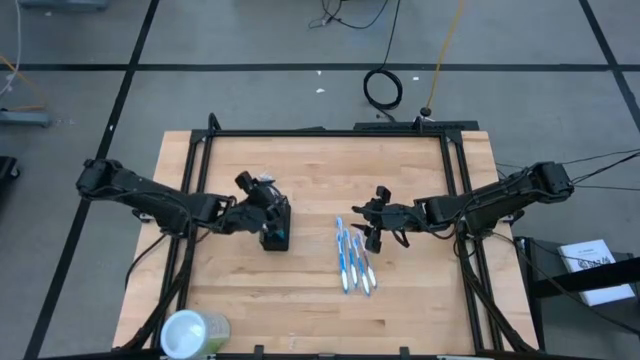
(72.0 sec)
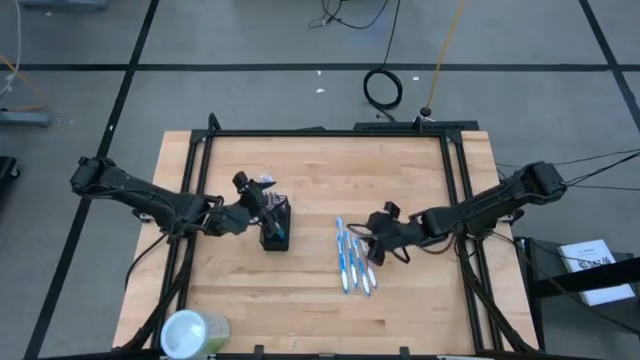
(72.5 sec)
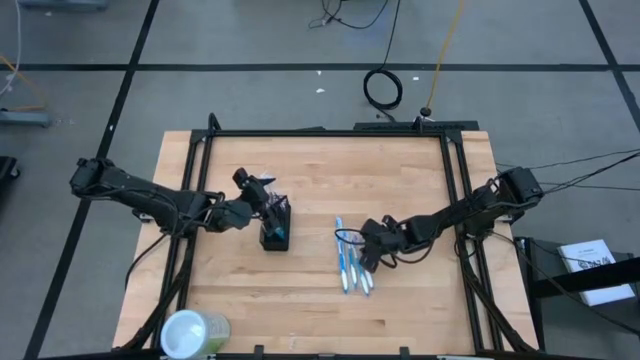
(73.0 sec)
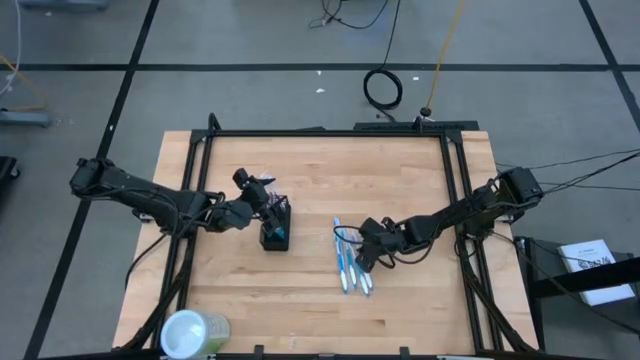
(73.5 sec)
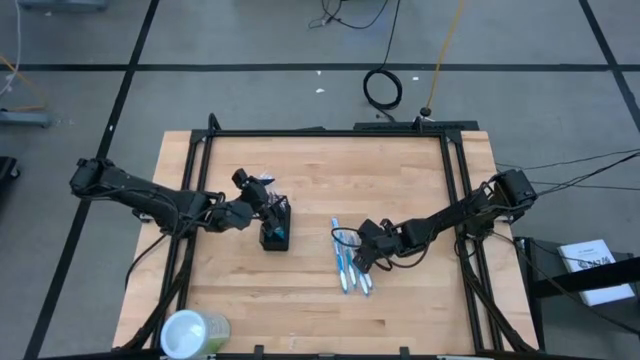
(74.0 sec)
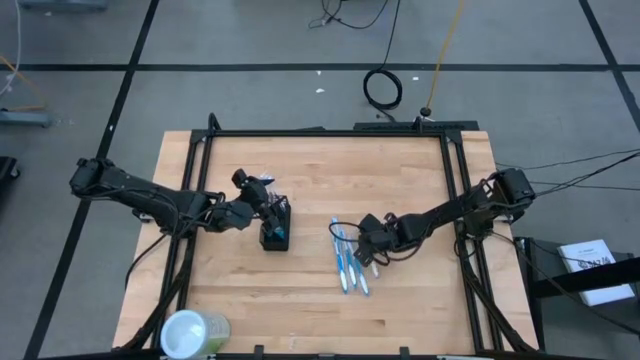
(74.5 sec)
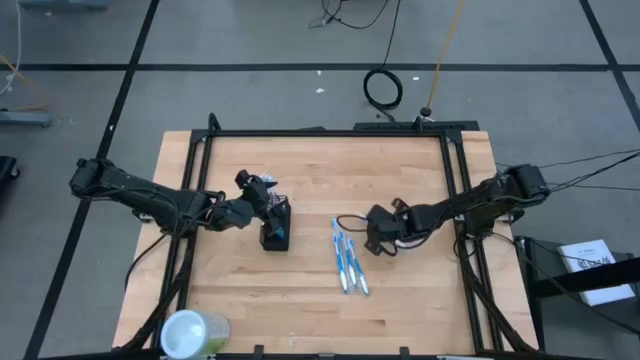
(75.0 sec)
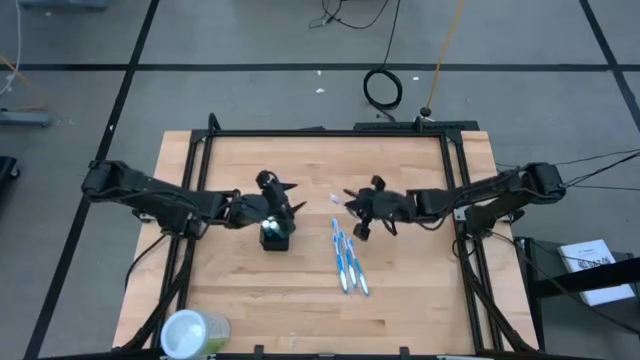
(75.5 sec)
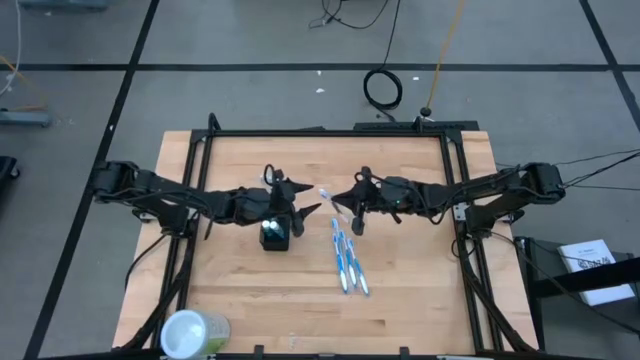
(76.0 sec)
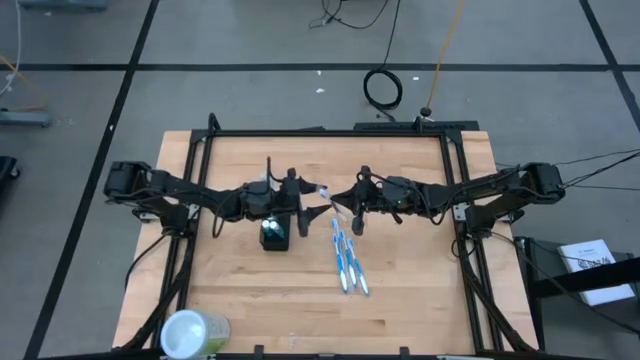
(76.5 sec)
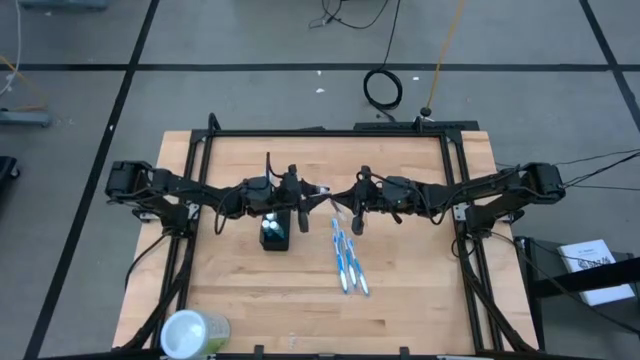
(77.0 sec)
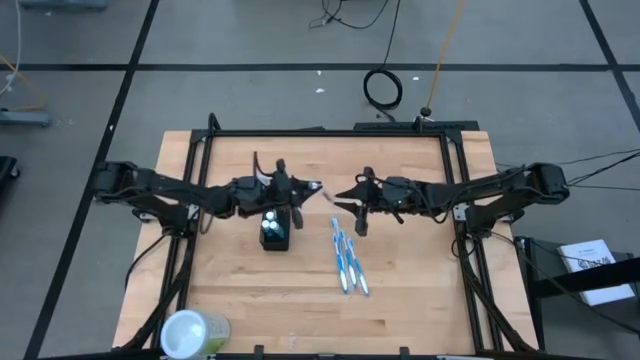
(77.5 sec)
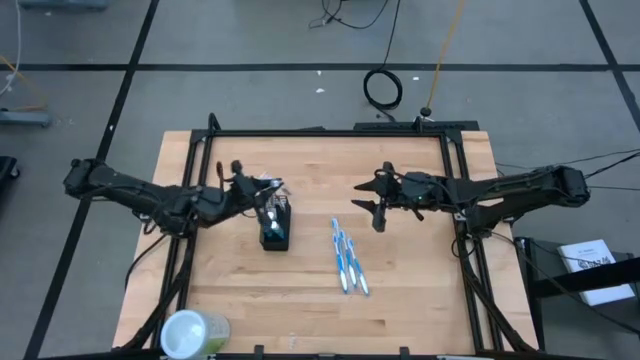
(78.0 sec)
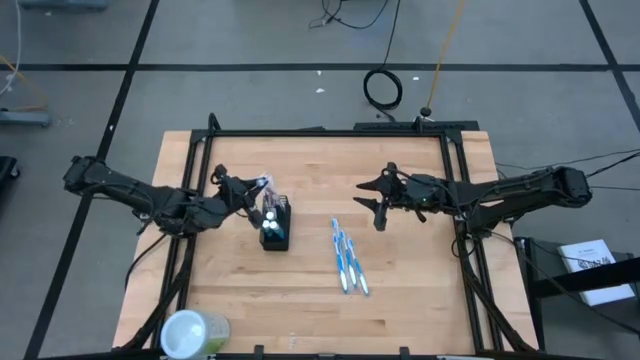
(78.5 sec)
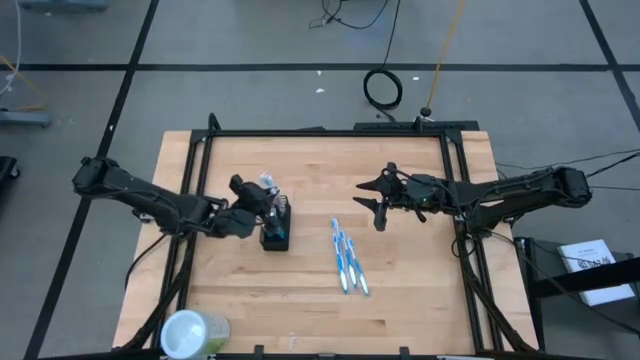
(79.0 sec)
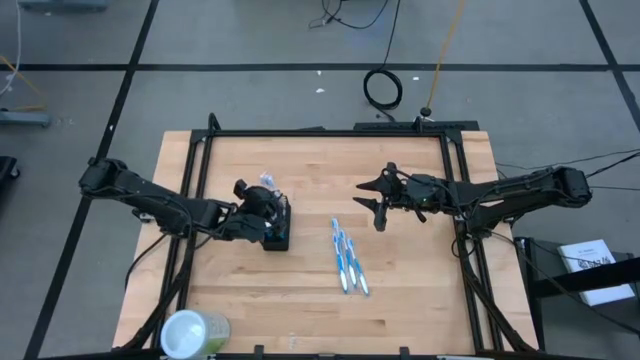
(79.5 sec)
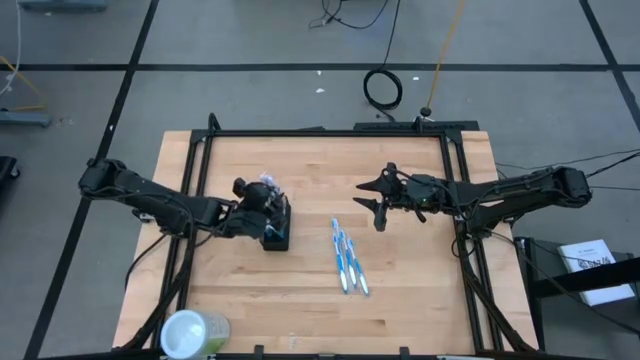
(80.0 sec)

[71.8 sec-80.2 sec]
Task: Pick & Place toothbrushing station
Put the purple toothbrush into the top compartment of the mesh organizer

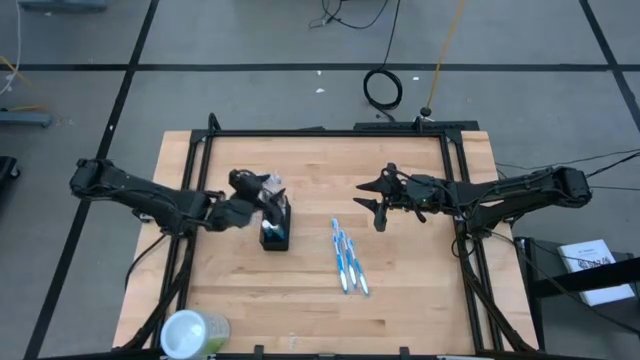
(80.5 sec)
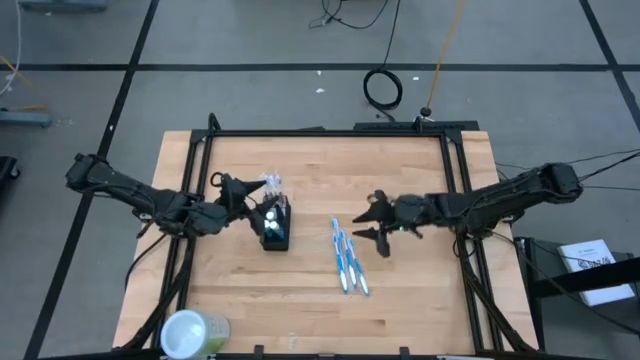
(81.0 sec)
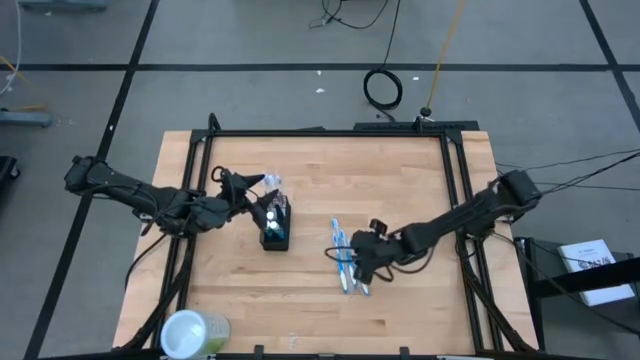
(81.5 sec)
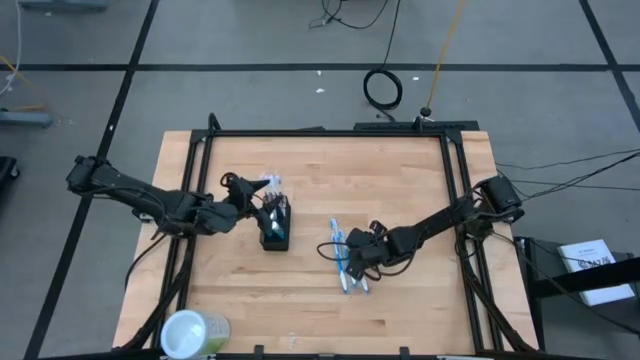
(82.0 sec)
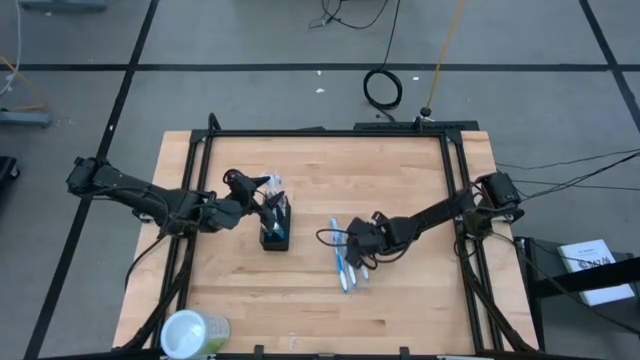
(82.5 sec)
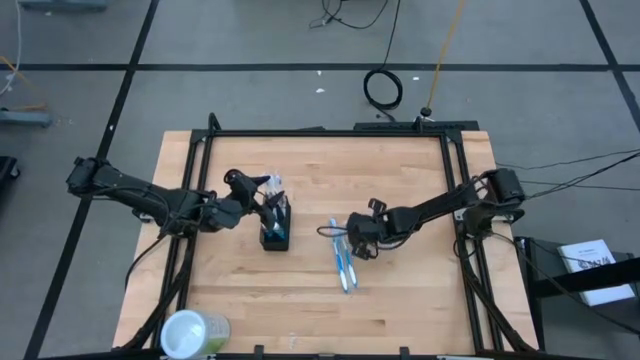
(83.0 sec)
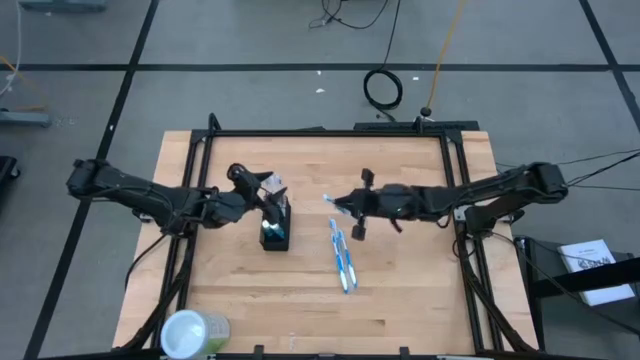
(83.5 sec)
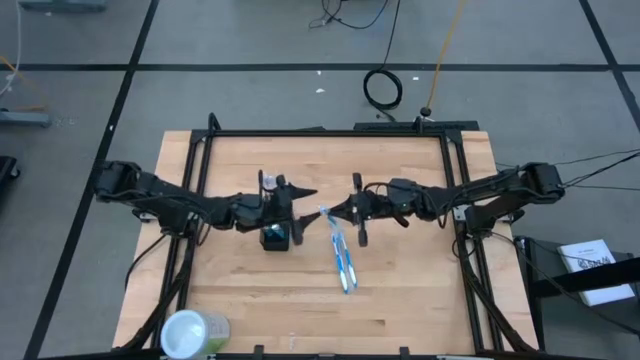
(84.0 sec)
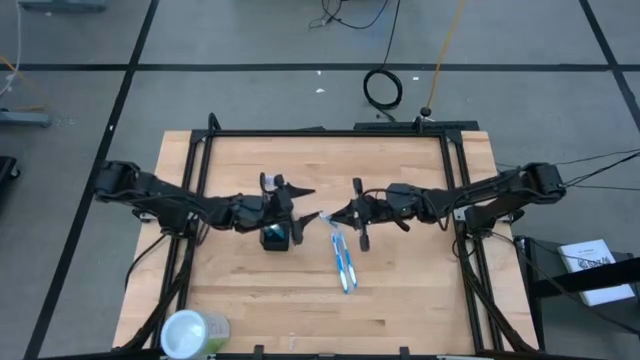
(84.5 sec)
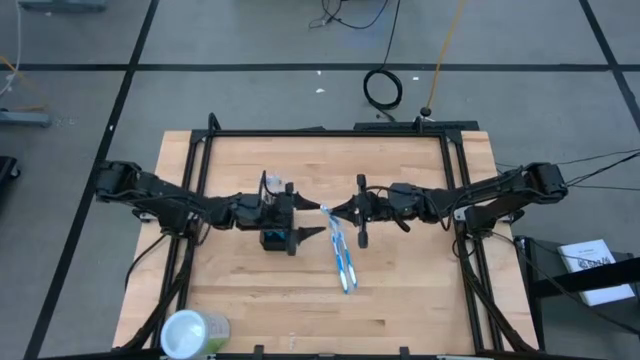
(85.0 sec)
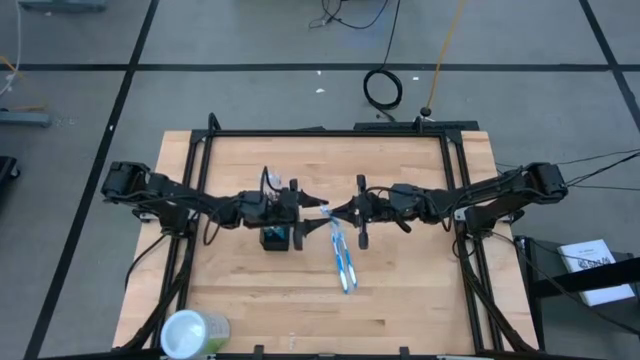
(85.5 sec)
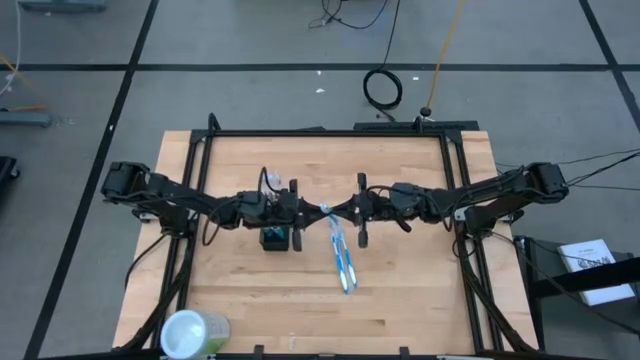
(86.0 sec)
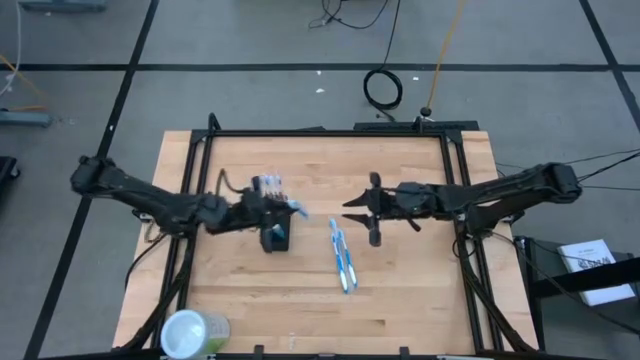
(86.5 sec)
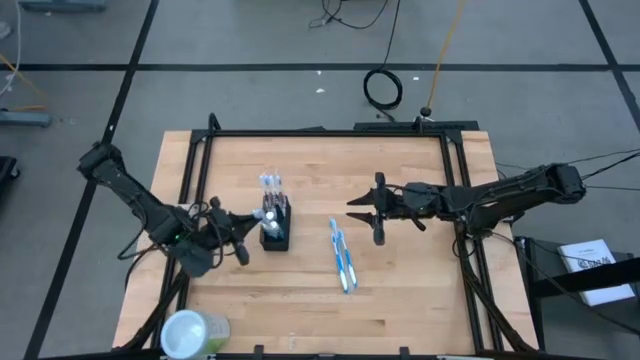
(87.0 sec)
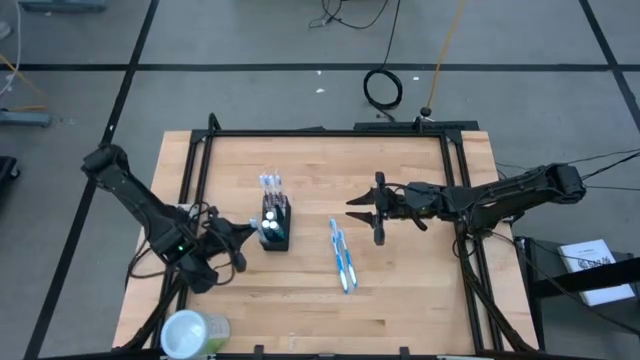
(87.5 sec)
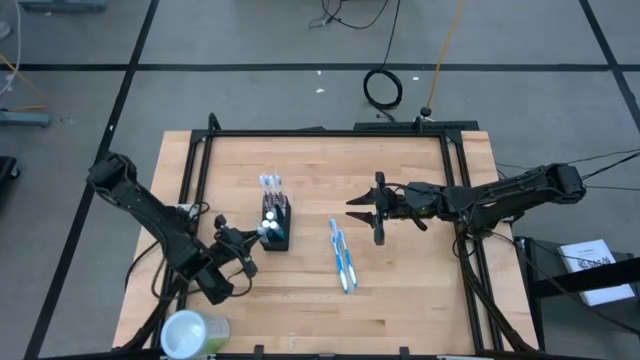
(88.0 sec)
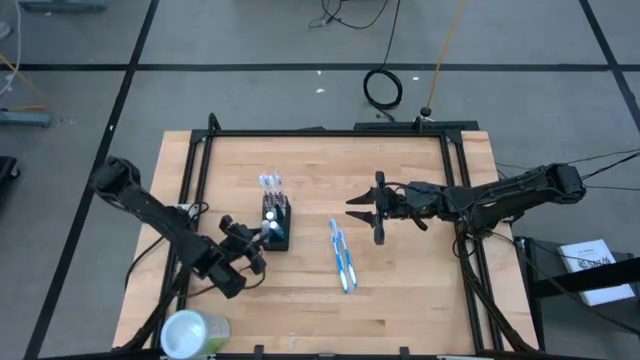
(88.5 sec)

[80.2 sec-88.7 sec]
Put the blue toothbrush into the bottom compartment of the mesh organizer

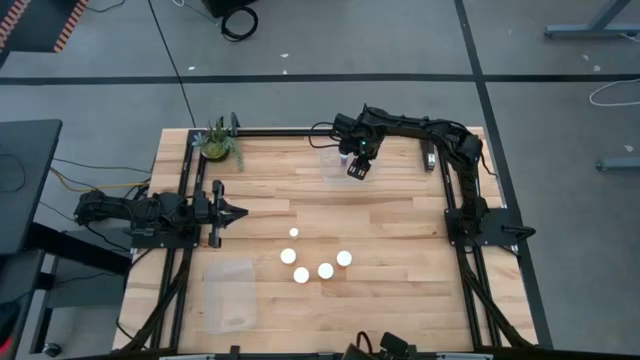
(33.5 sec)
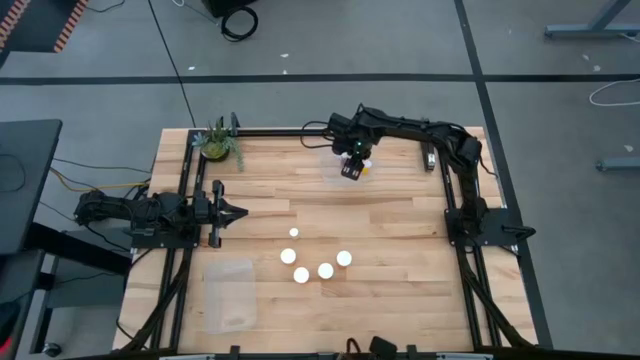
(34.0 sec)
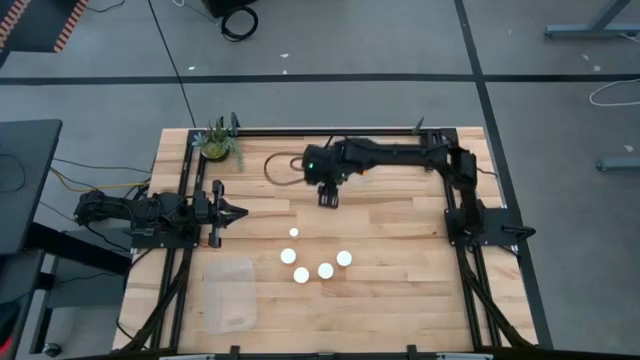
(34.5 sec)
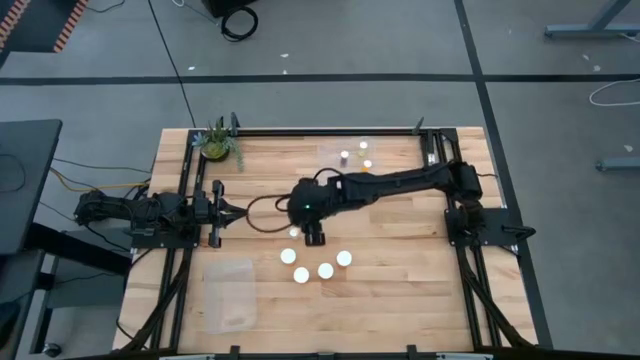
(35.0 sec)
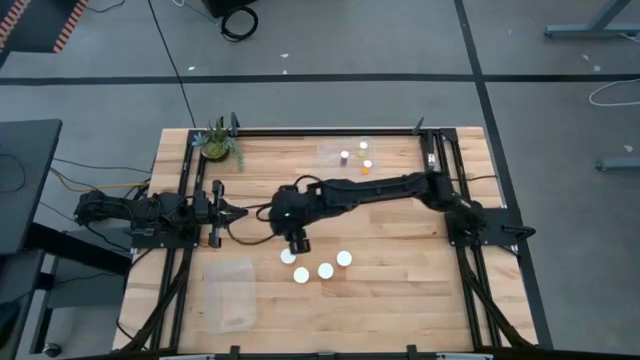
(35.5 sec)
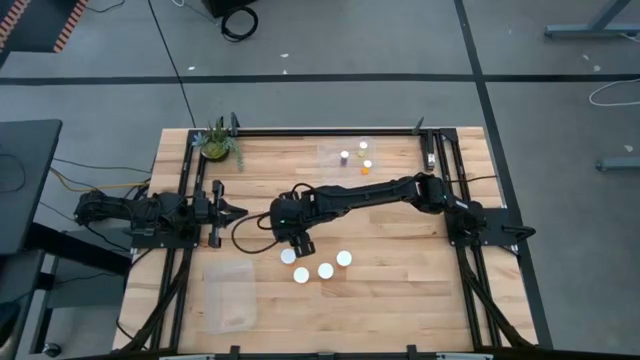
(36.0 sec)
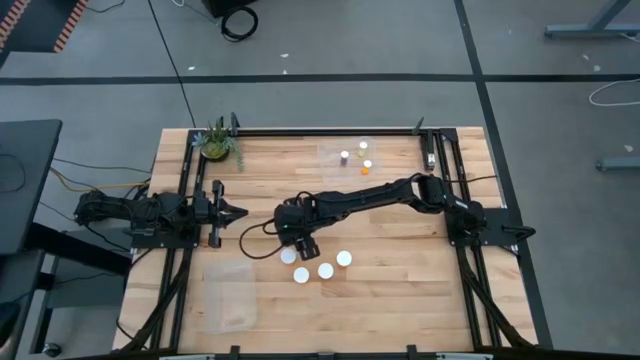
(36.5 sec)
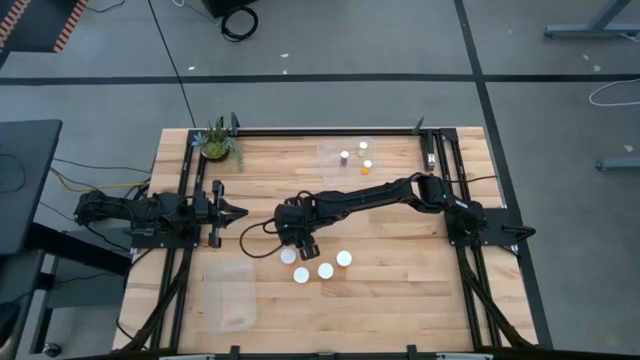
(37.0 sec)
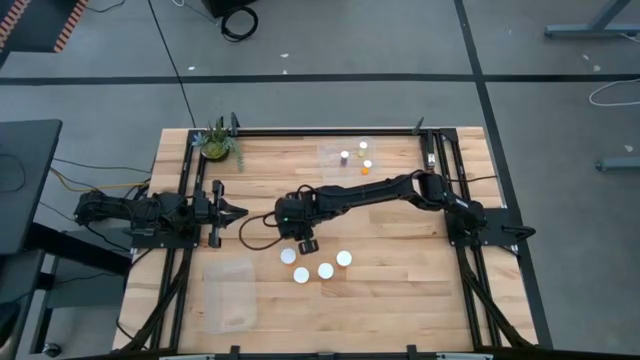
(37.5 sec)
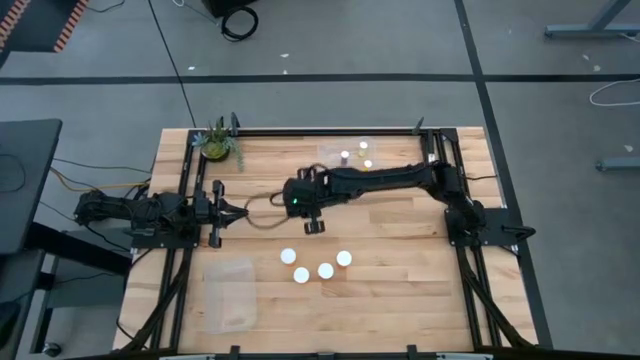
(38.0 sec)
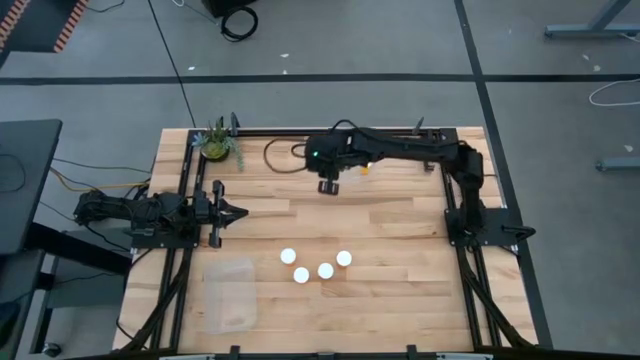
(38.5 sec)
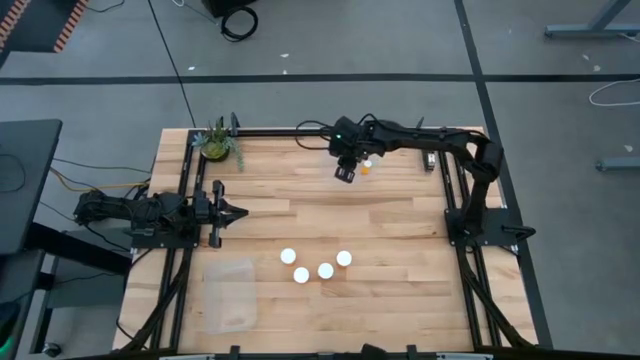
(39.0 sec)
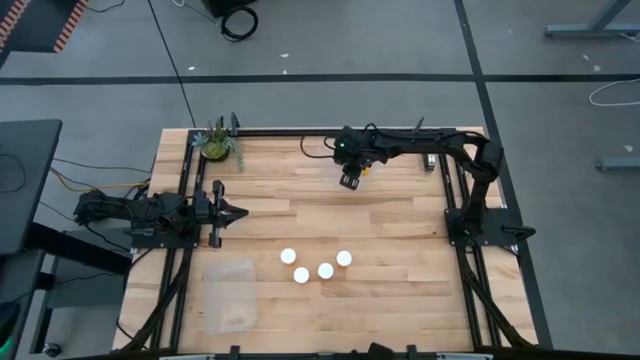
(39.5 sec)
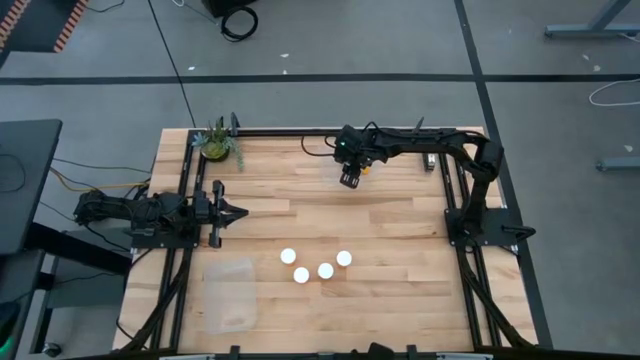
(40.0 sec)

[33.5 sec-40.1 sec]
Task: Pick and place medicine bottles into bin by pill shape (circle, oval)
Put the small yellow pill bottle into the top transparent bin
